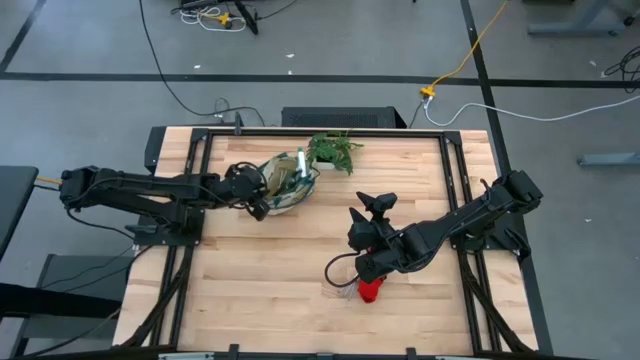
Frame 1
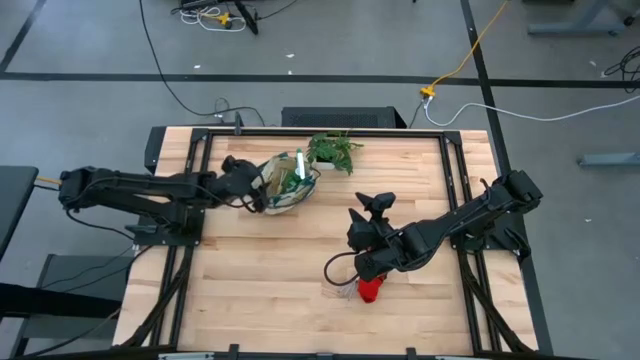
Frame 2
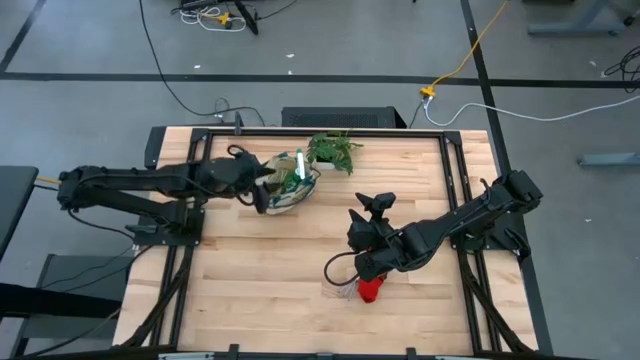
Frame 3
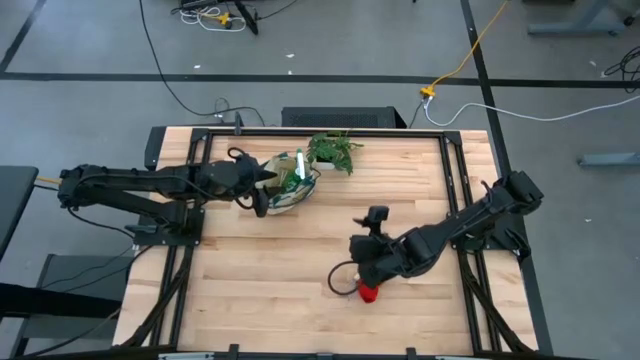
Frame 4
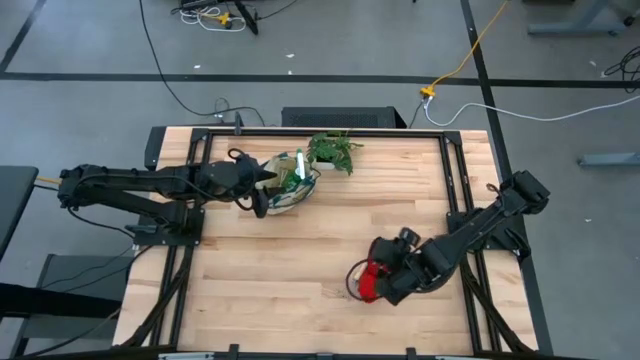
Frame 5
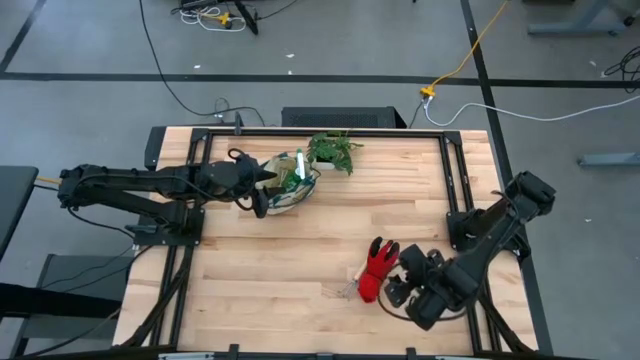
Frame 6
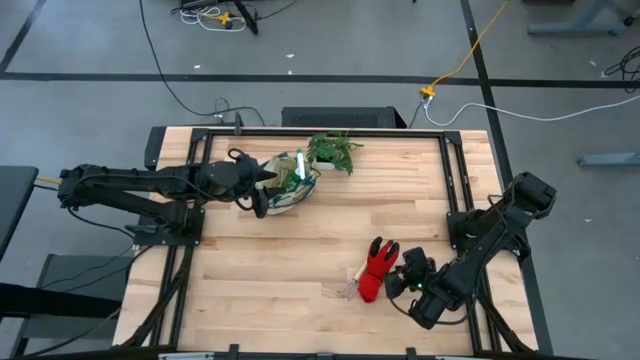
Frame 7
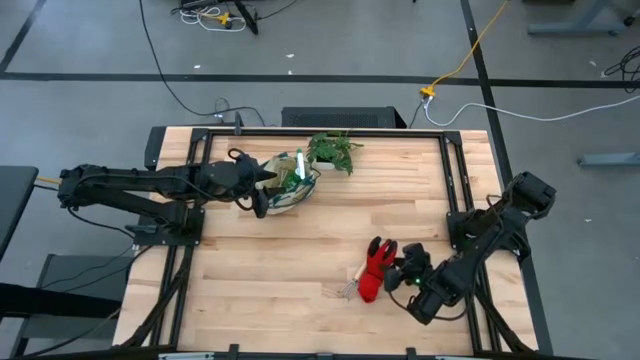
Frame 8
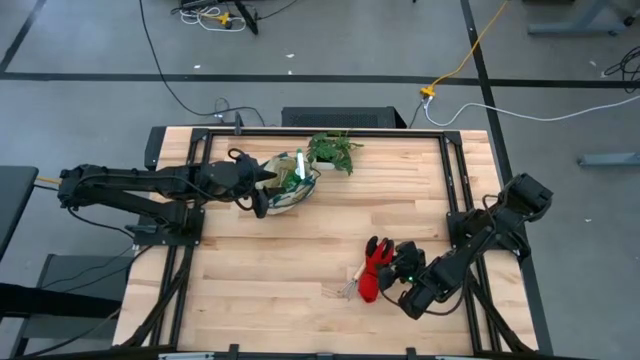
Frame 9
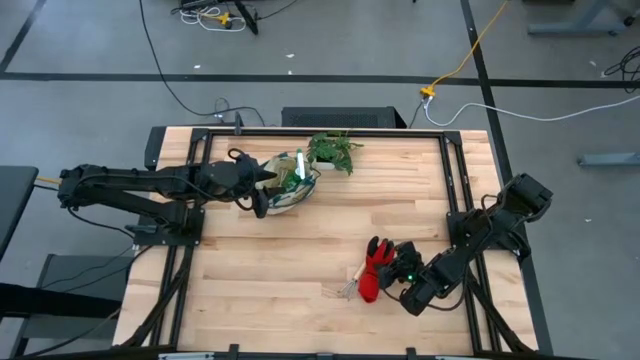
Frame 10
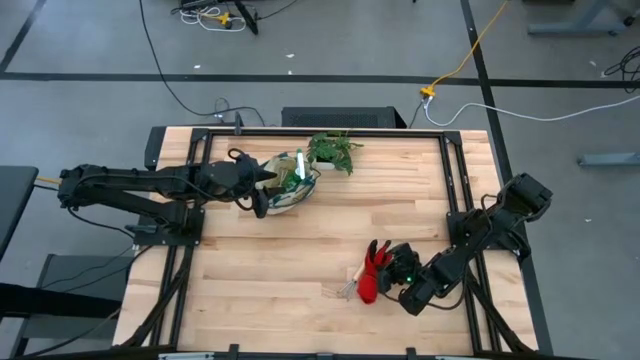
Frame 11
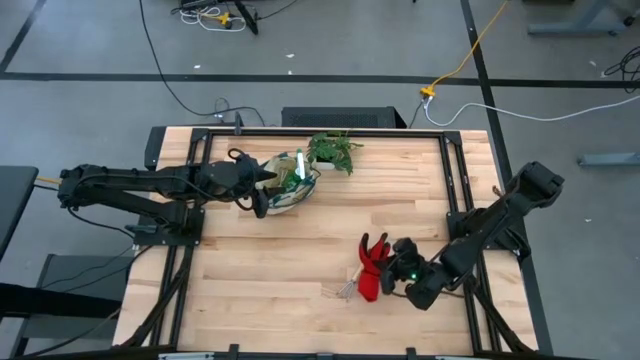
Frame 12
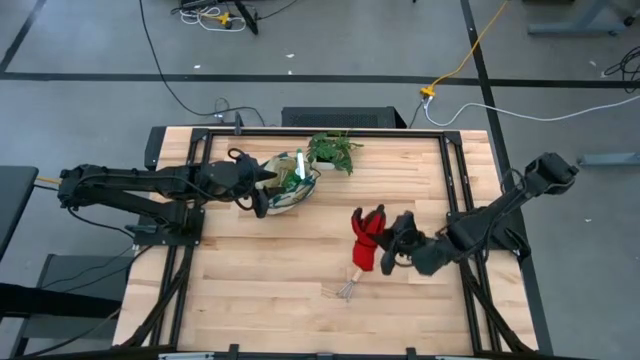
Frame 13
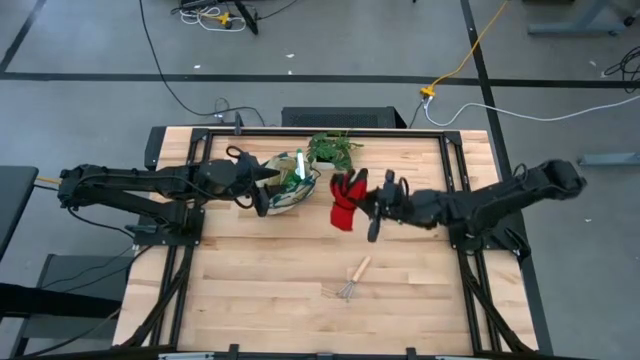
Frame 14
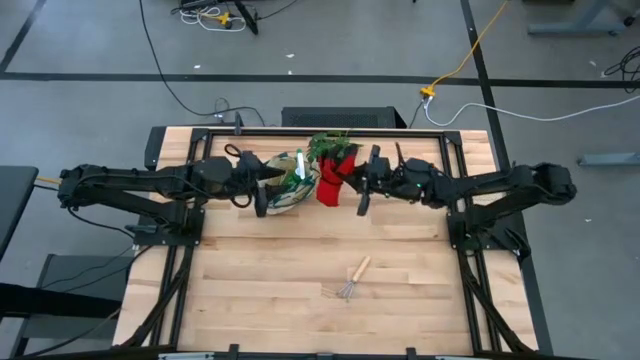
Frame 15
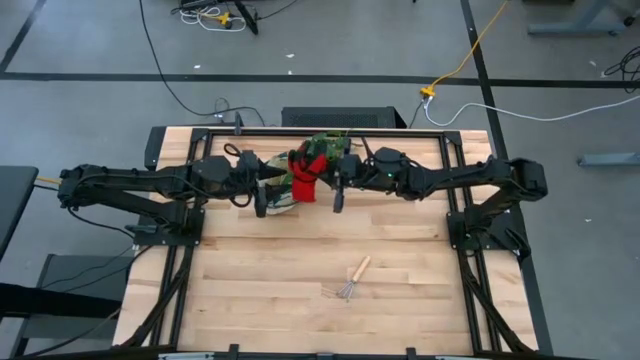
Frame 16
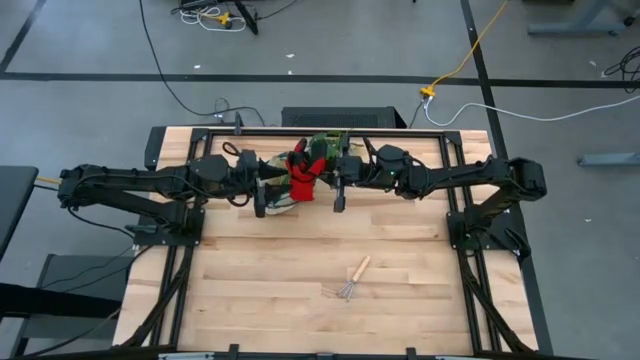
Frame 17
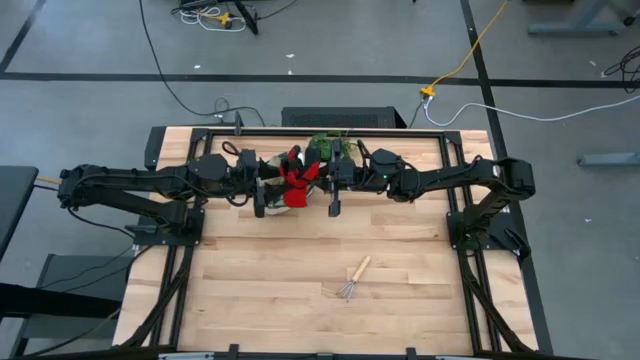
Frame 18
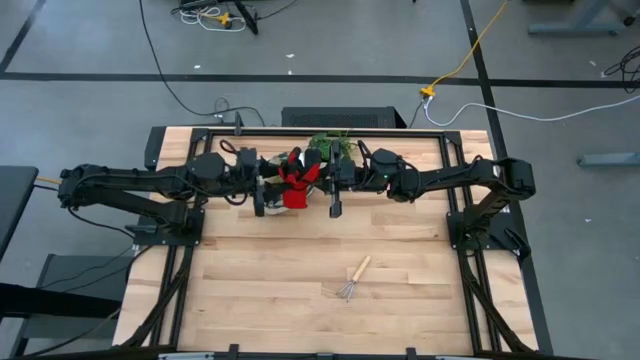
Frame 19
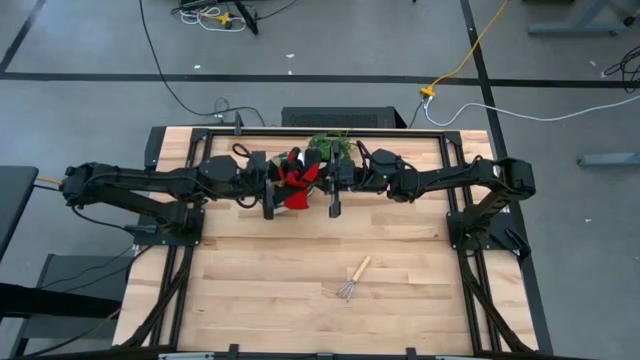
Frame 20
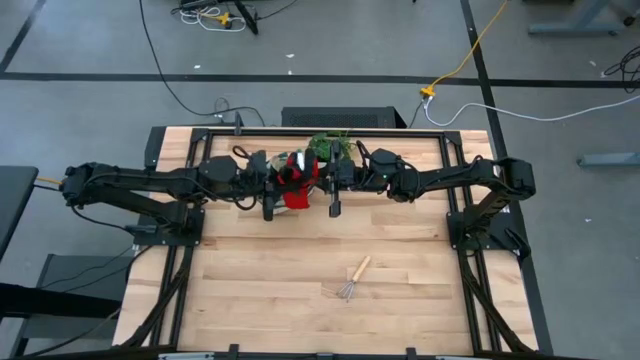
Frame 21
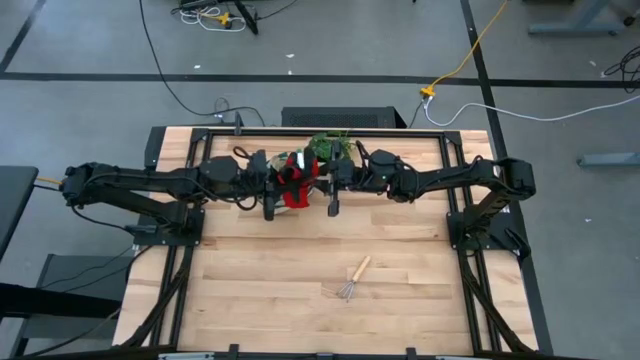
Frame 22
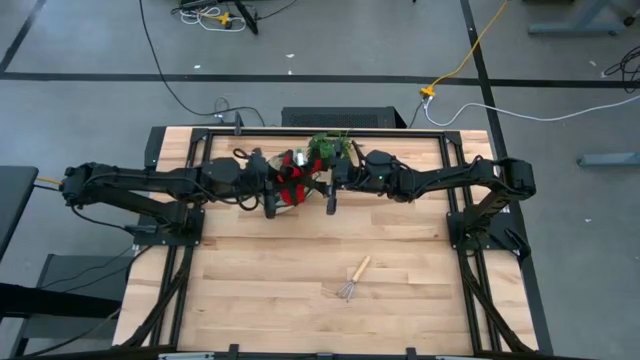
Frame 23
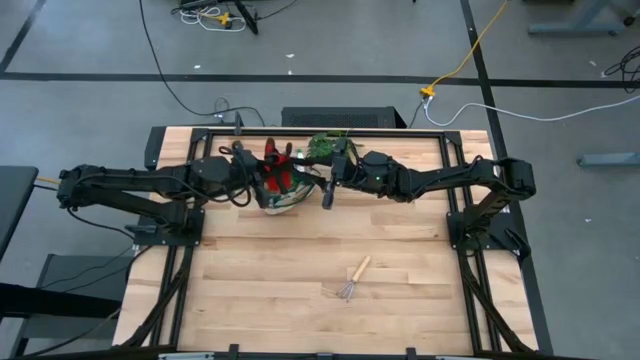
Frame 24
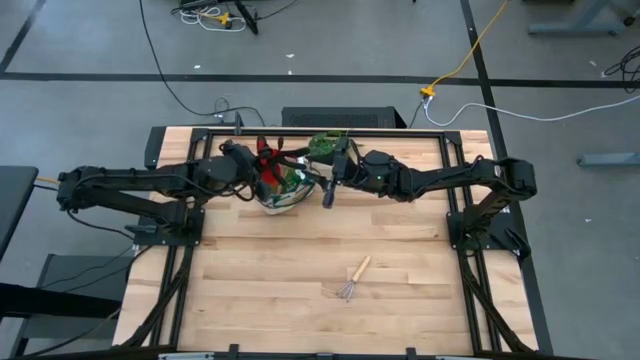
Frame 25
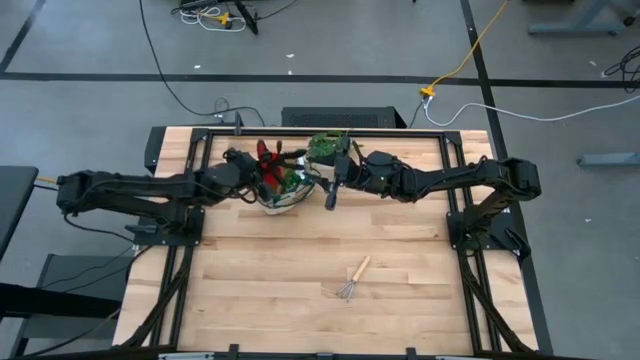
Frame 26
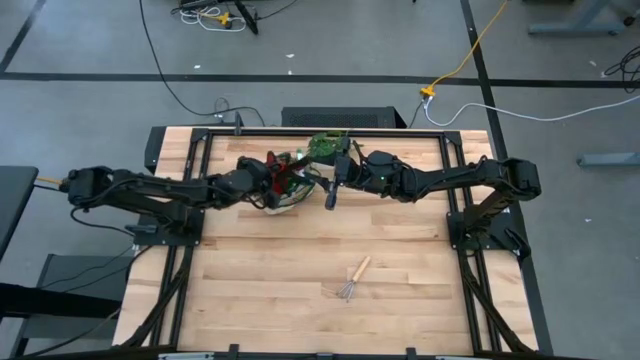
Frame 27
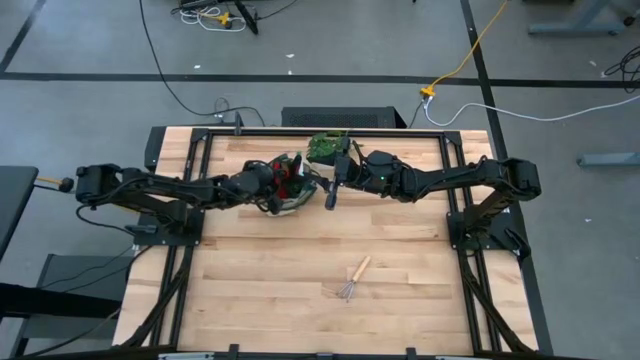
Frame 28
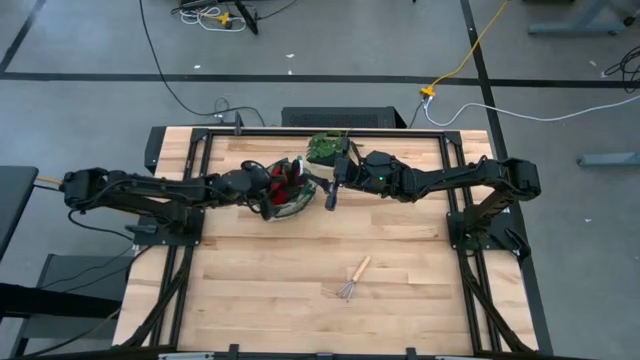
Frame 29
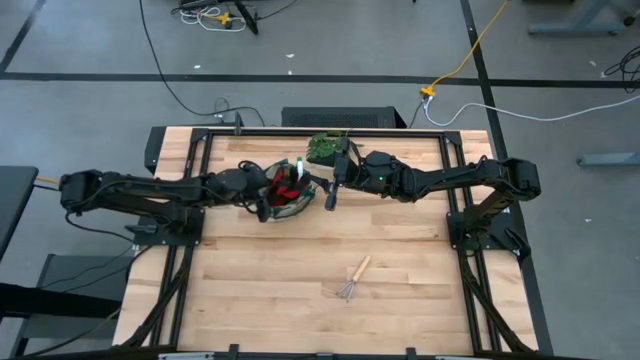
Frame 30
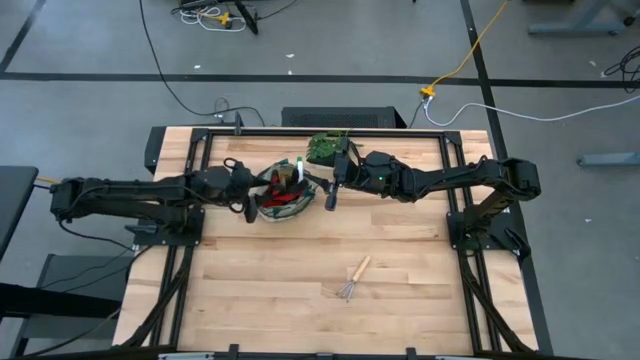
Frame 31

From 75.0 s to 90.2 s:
Task: Pick & Place Garden tools in Gardening bag
Put the red gloves into the gardening bag

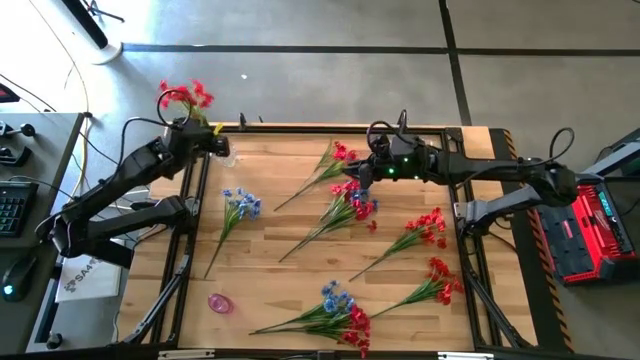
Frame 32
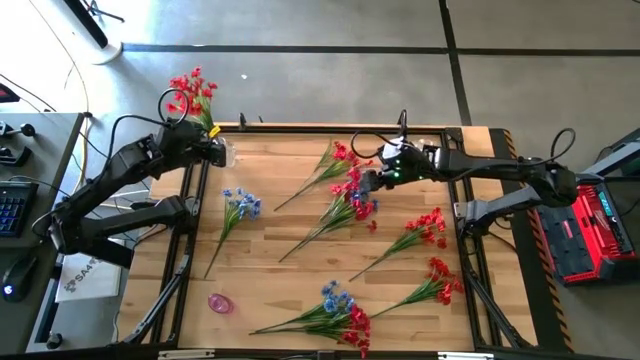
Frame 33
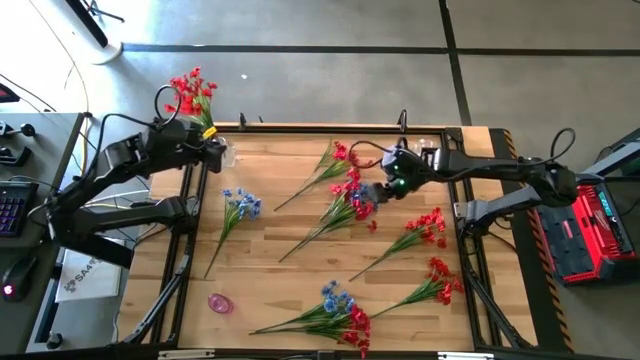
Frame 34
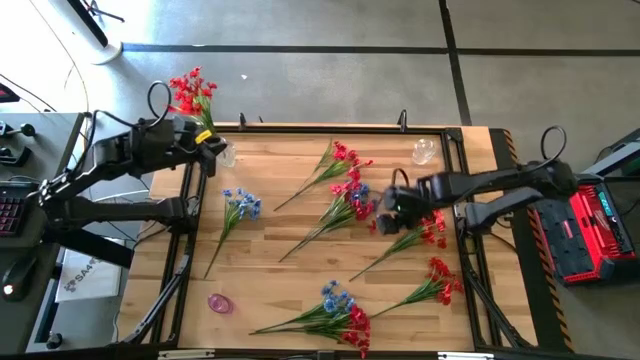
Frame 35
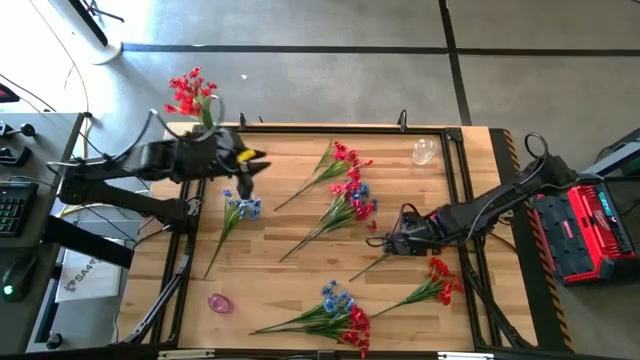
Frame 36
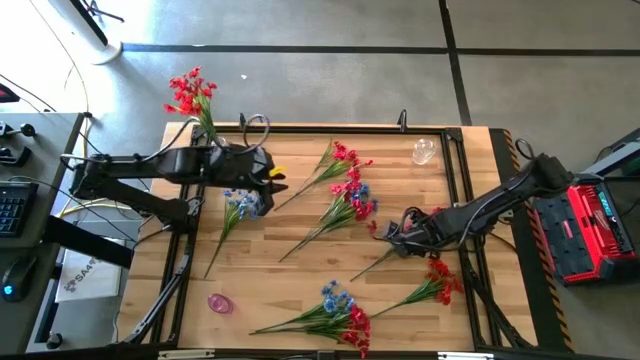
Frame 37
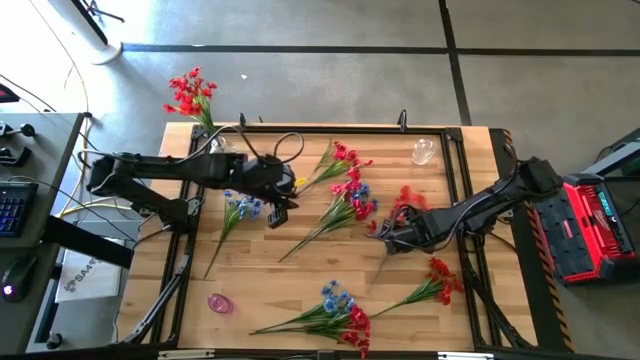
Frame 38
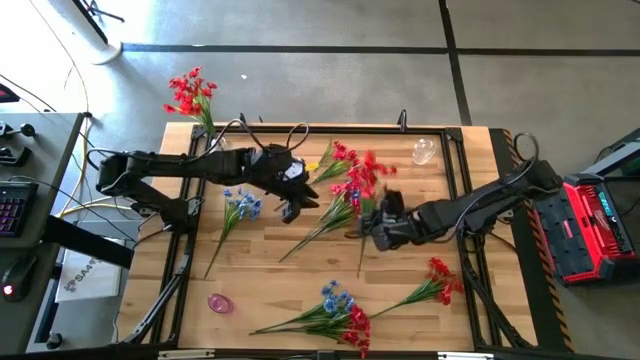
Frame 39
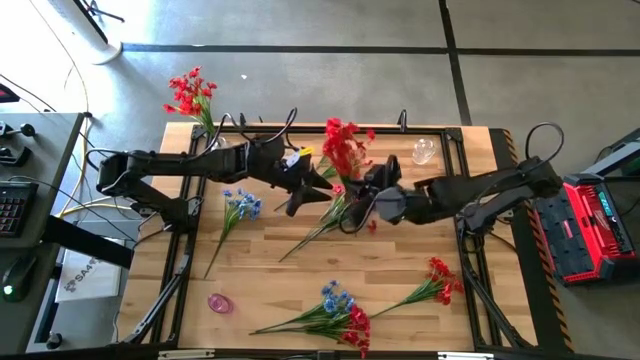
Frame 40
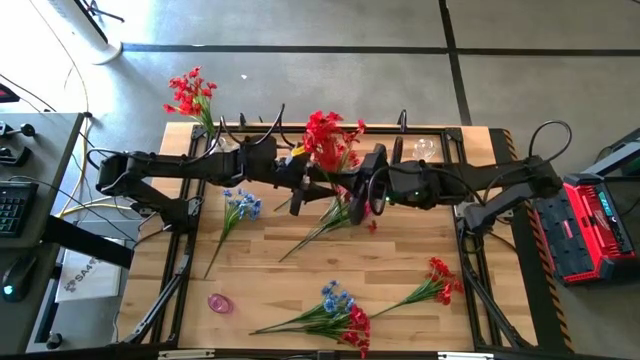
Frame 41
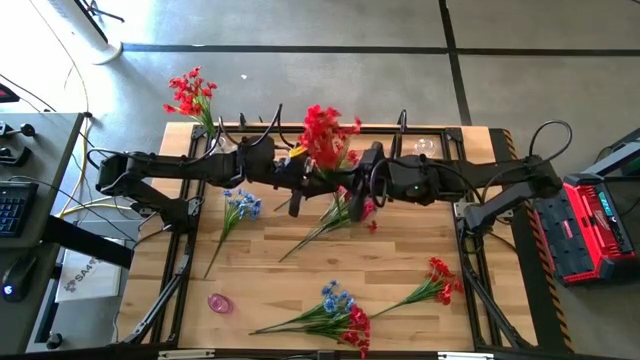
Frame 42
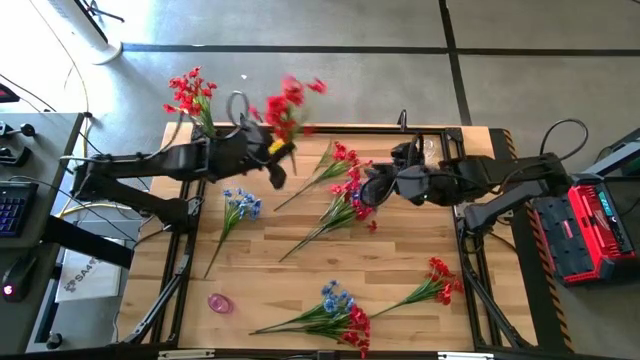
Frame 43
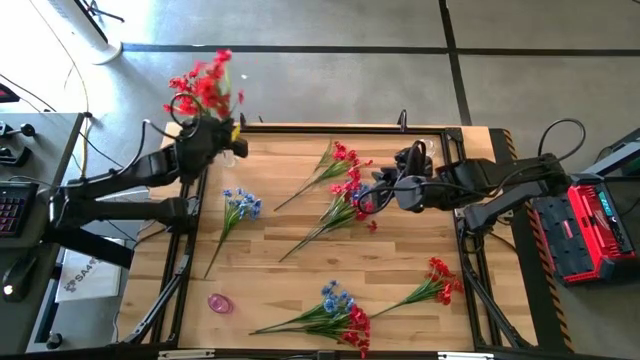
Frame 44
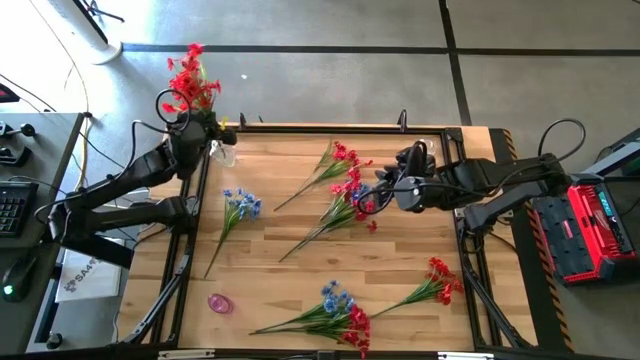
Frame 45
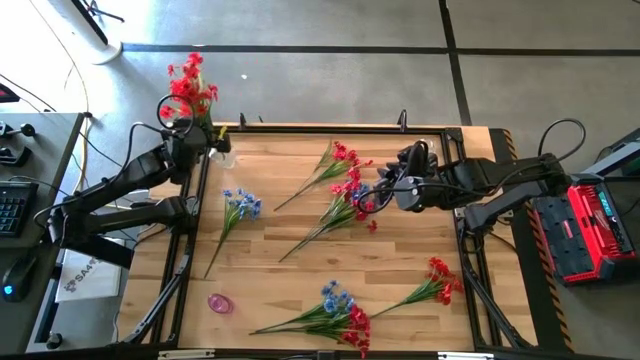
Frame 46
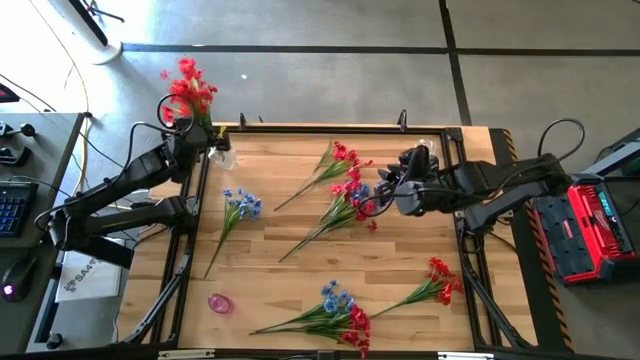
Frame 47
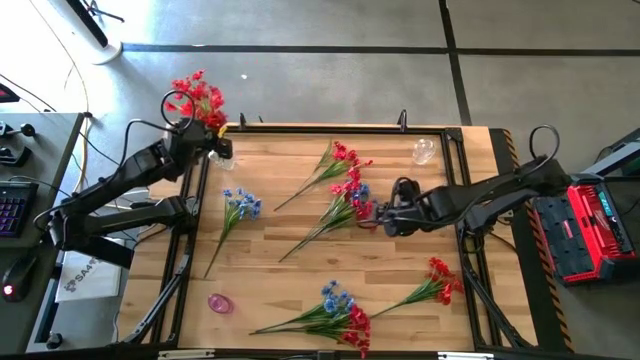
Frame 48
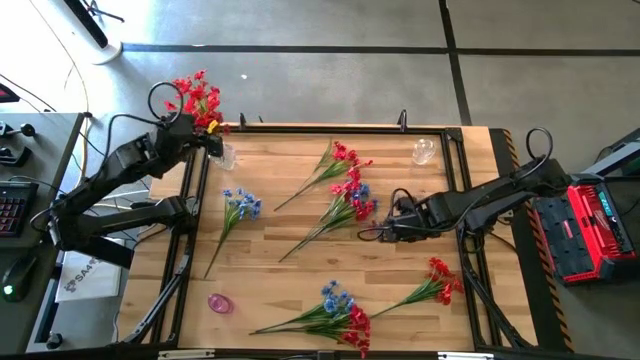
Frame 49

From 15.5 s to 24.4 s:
Task: Sort flowers into vase by color
Put the middle right red flower into the left transparent vase
